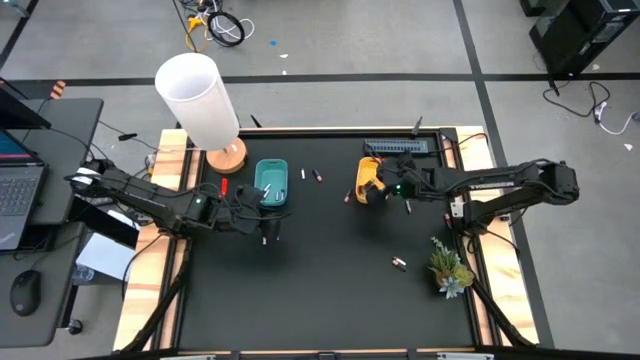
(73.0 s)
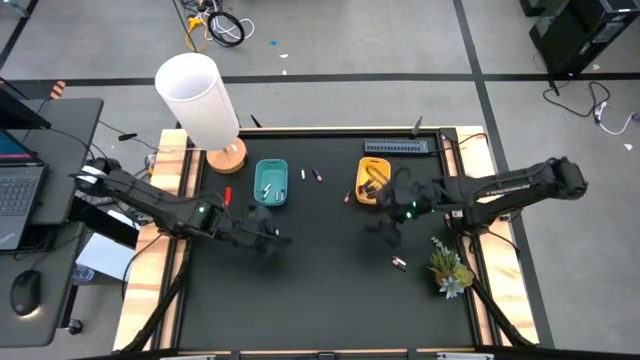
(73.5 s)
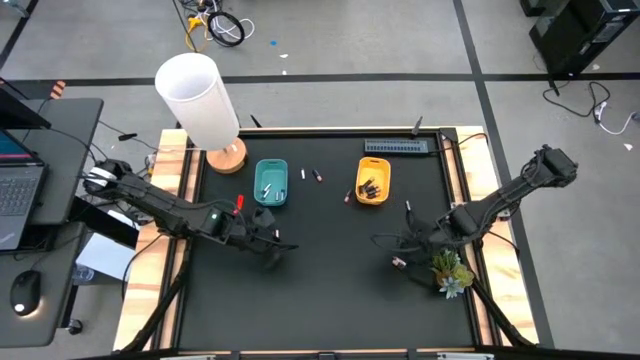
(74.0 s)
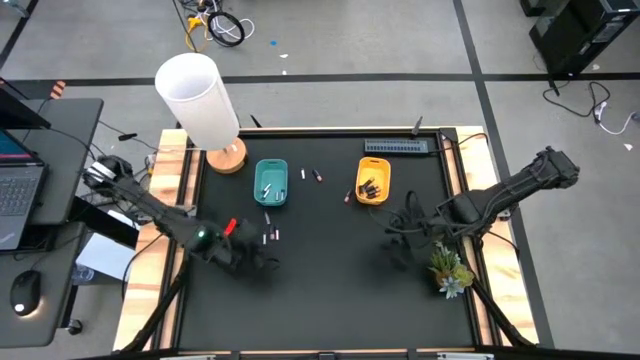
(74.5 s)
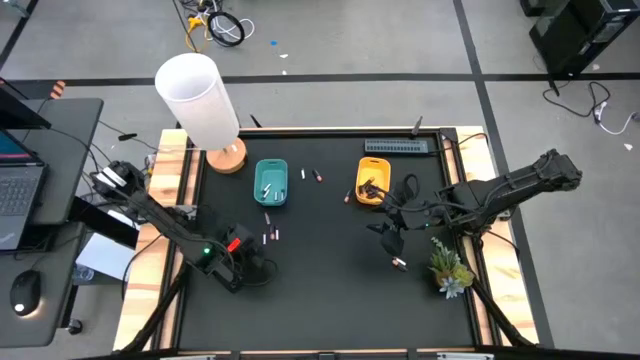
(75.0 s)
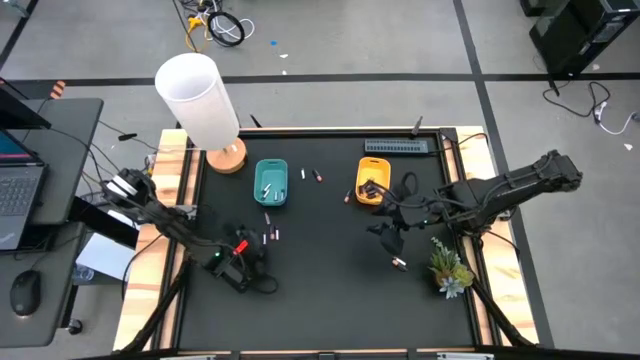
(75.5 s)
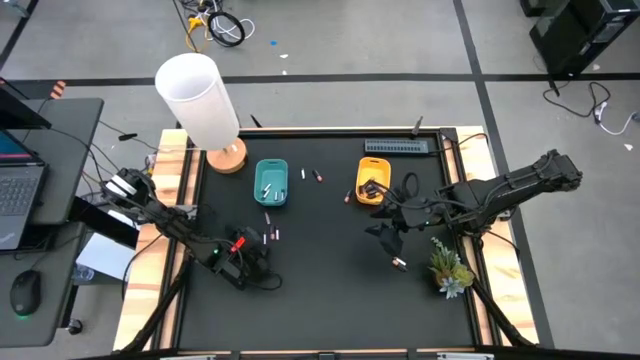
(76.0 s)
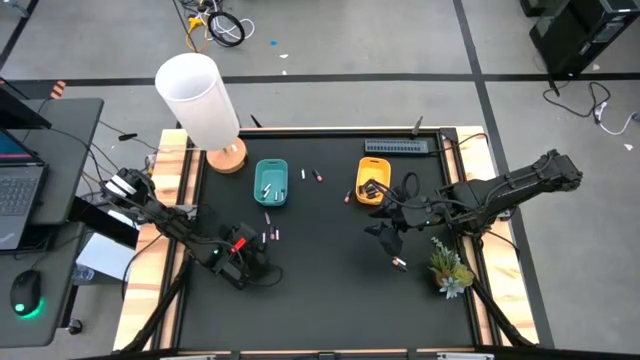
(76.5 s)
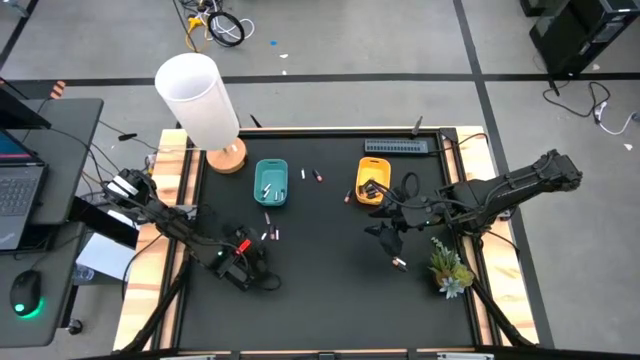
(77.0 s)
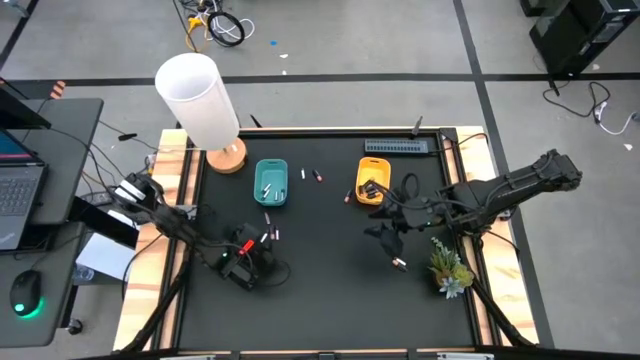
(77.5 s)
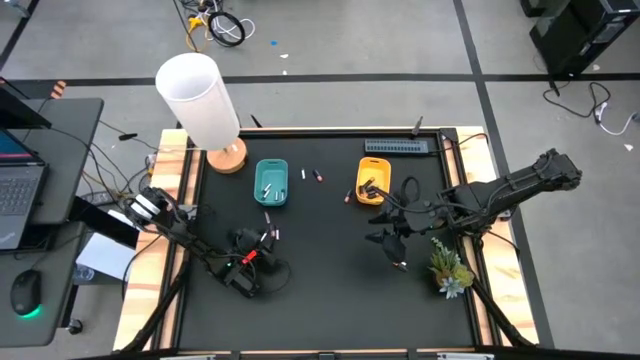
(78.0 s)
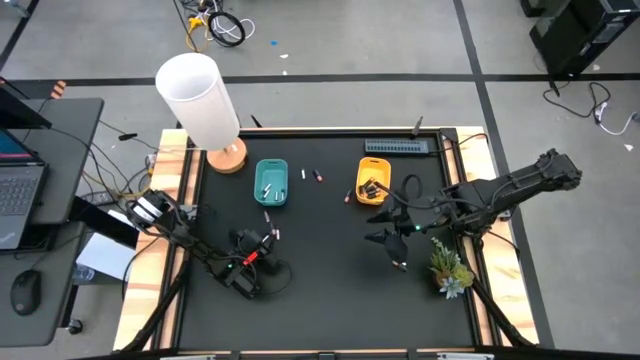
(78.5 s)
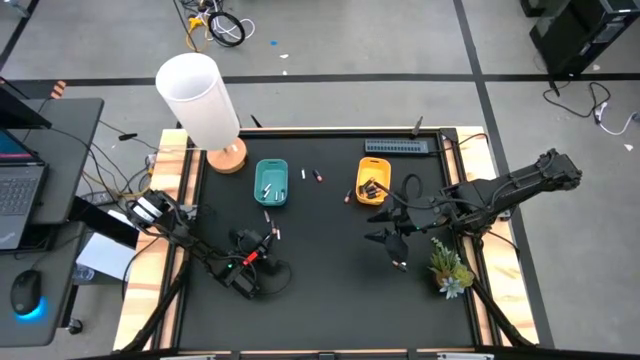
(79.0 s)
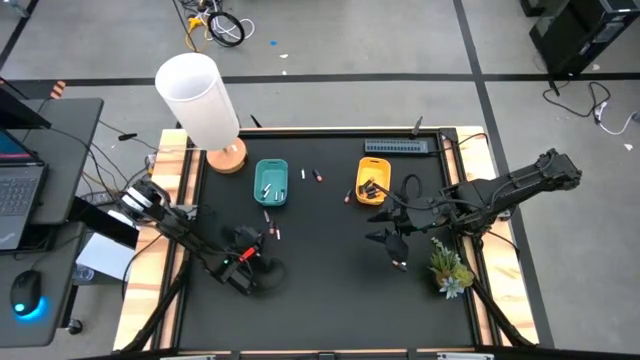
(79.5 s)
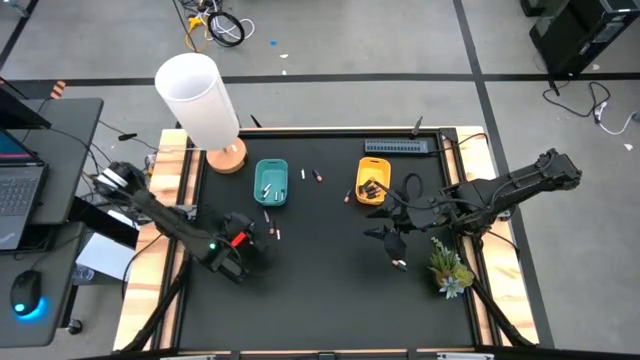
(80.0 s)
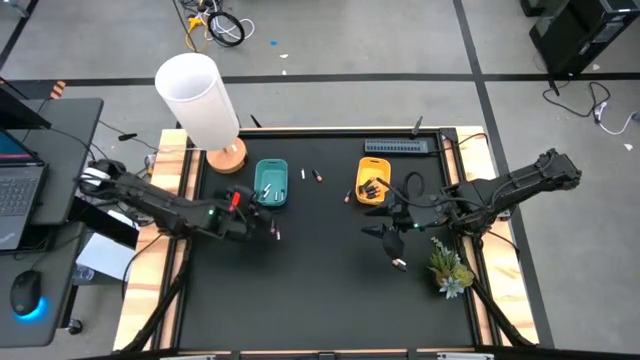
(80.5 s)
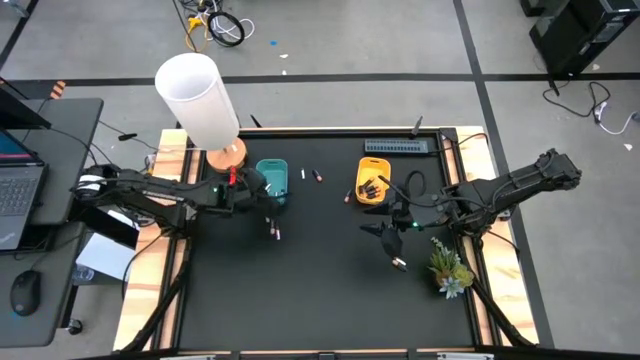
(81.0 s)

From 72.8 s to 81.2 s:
Task: Sort batteries
Put the silver battery into the blue bin

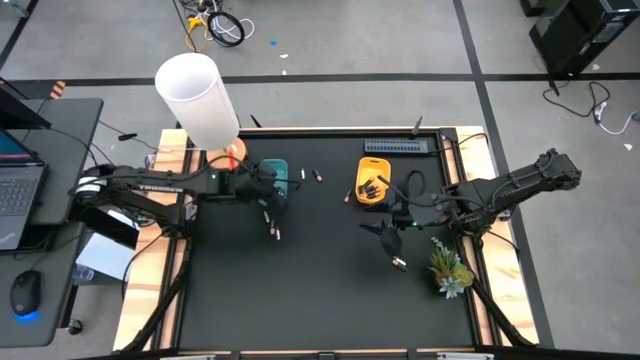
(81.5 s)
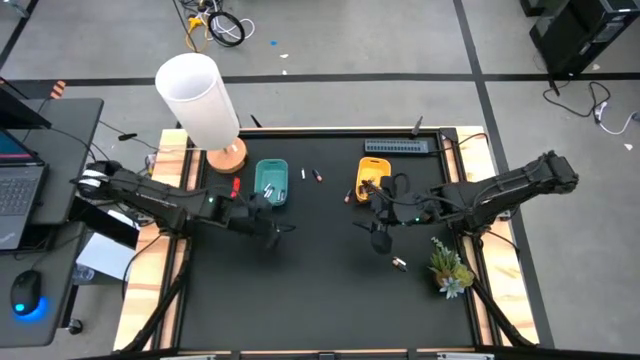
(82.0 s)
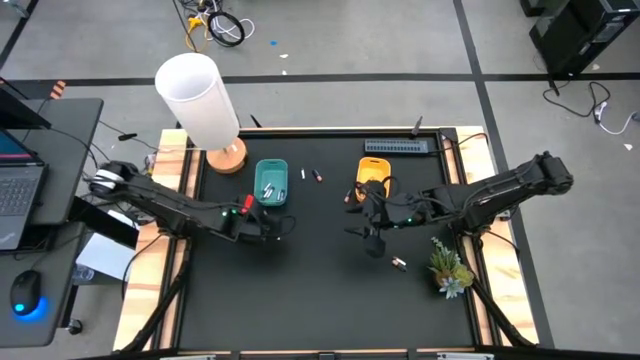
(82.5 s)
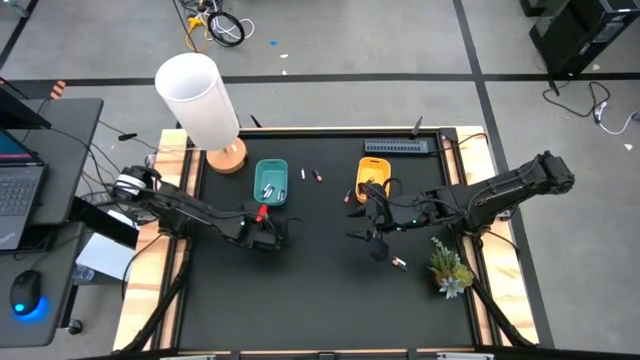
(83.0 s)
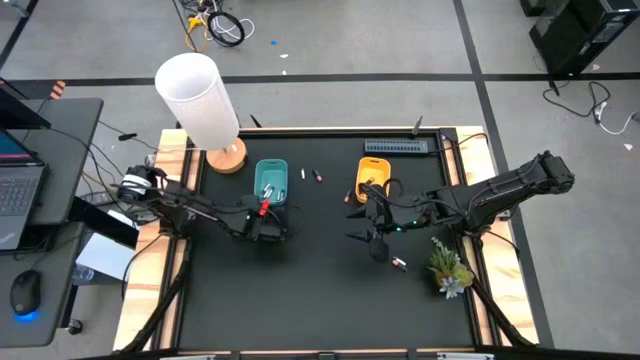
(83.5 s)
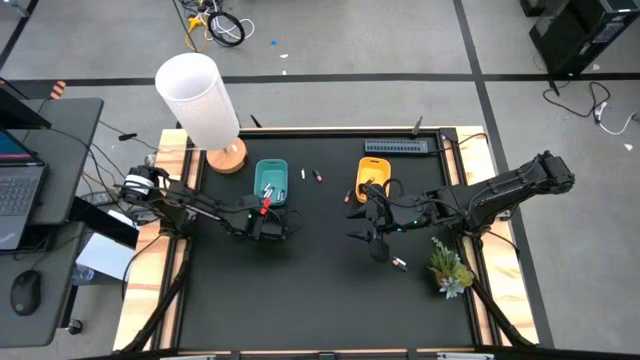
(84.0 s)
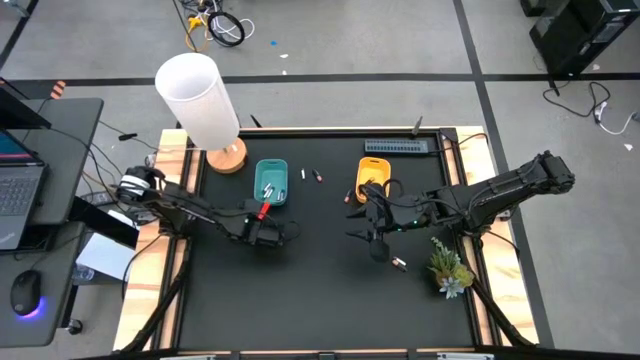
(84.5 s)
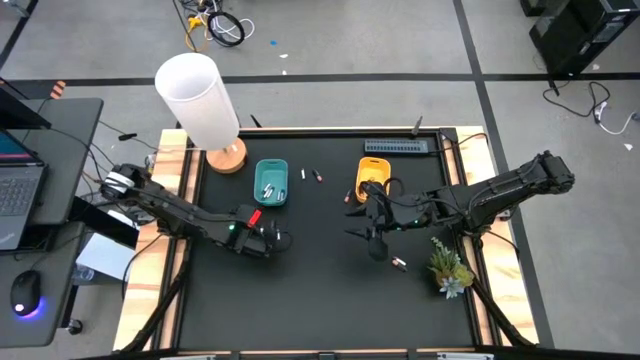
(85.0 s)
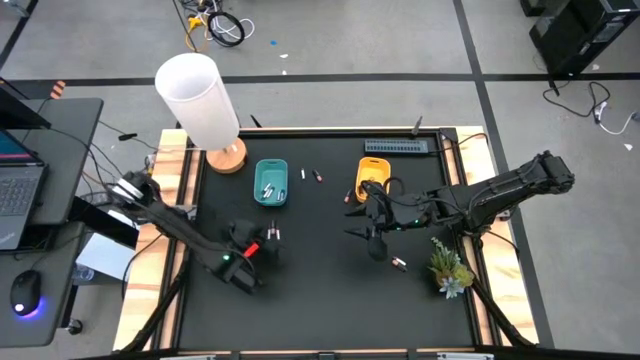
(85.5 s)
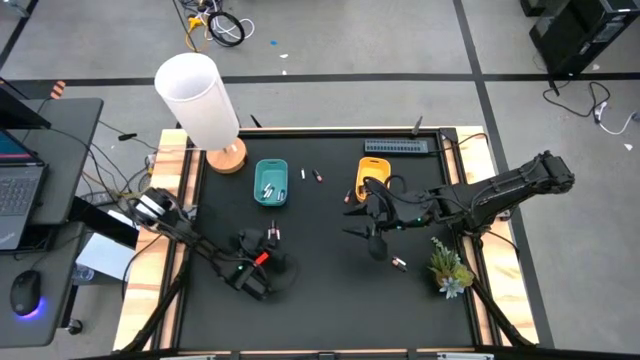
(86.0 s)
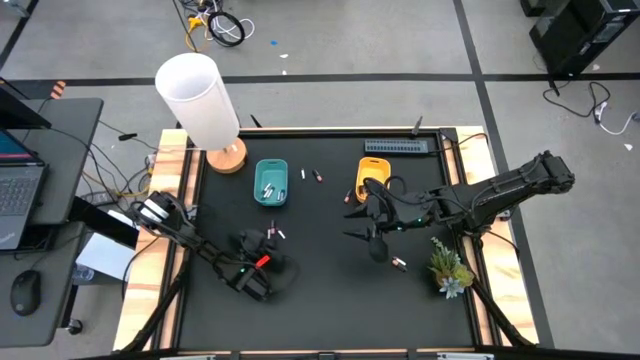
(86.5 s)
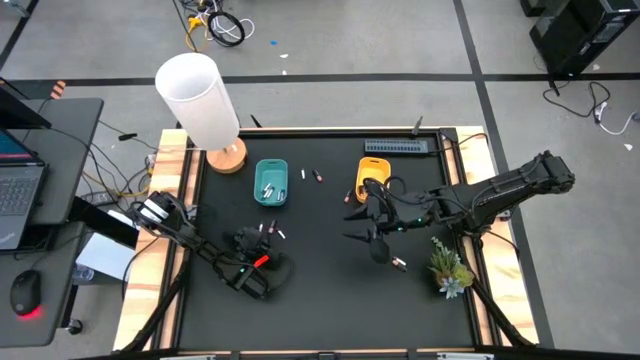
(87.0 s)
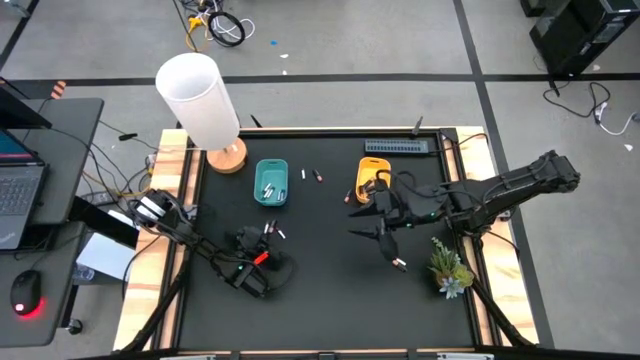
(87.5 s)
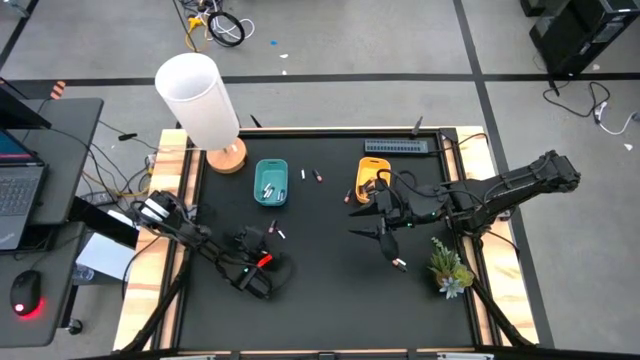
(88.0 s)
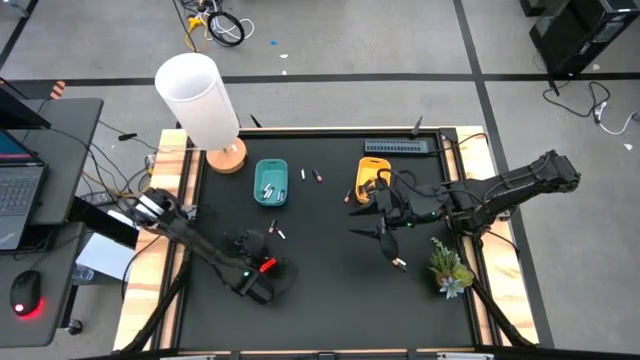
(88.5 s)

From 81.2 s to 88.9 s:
Put the silver battery into the blue bin

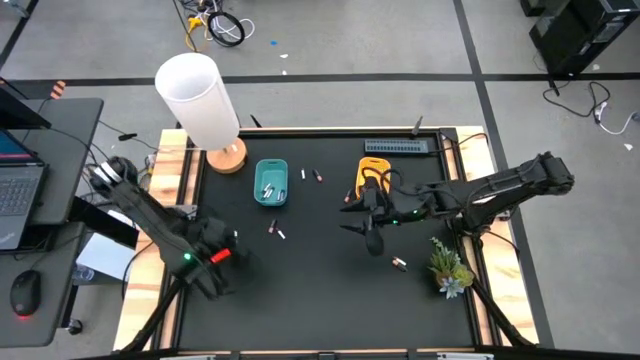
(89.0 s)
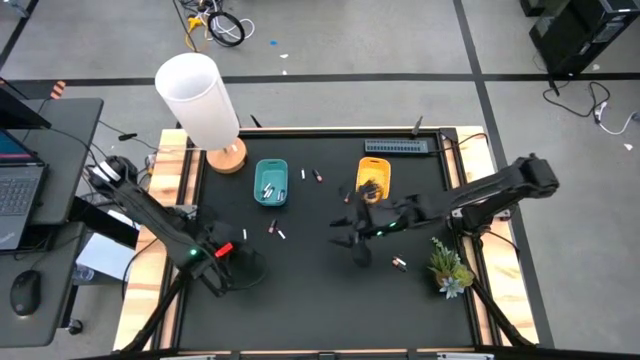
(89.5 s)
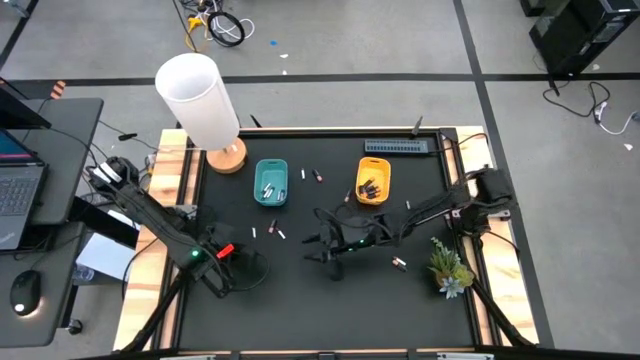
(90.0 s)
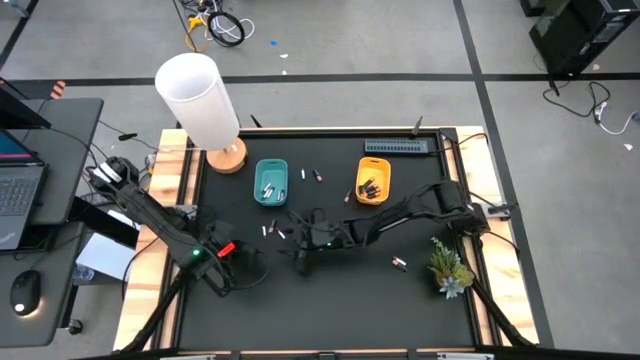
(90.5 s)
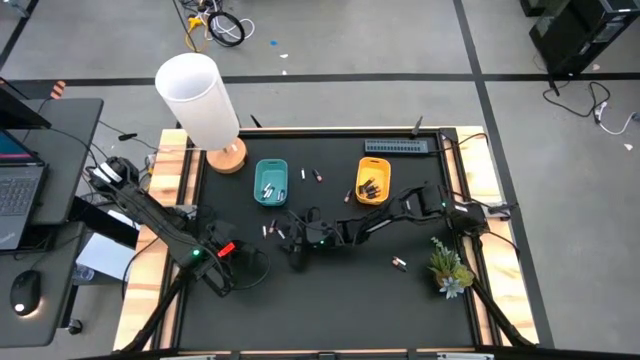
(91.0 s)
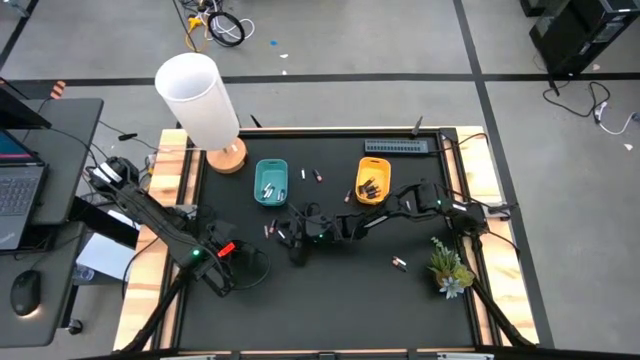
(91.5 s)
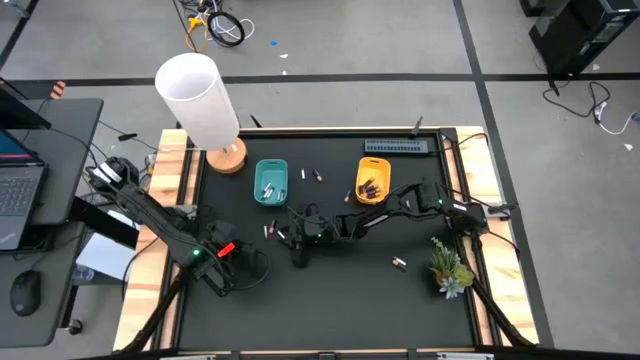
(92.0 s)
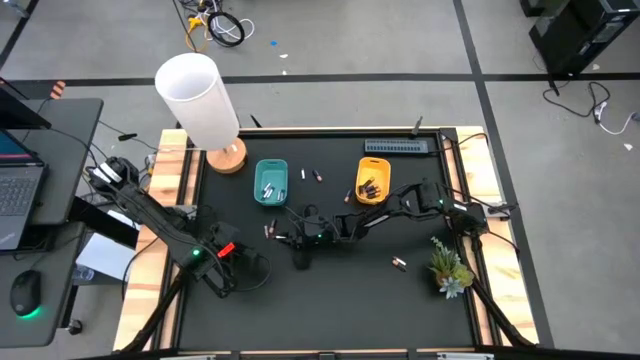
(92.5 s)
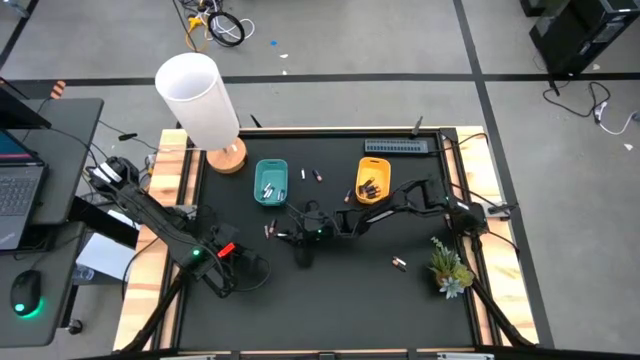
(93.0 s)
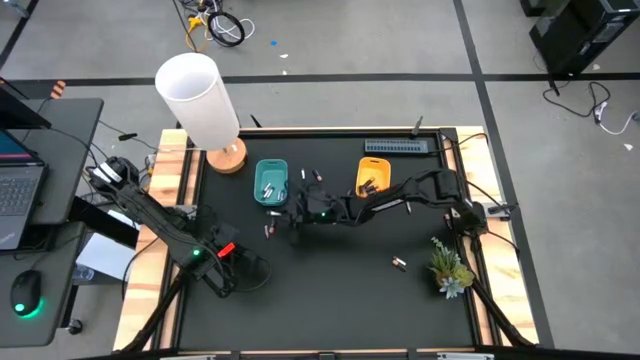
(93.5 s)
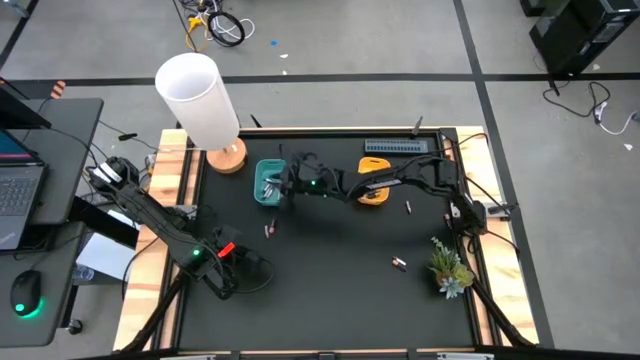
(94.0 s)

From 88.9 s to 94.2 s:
Put the silver battery into the blue bin
